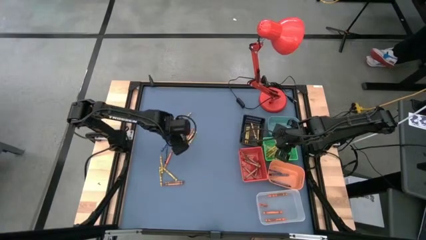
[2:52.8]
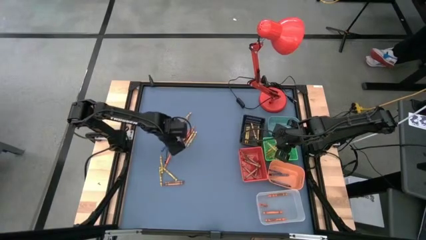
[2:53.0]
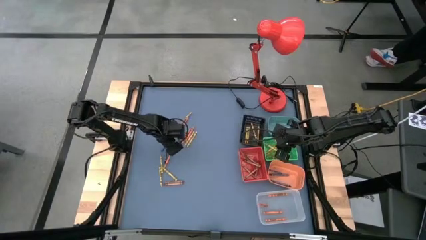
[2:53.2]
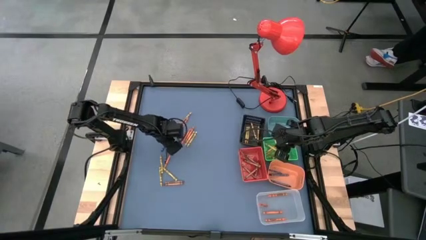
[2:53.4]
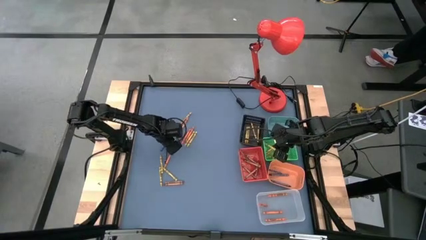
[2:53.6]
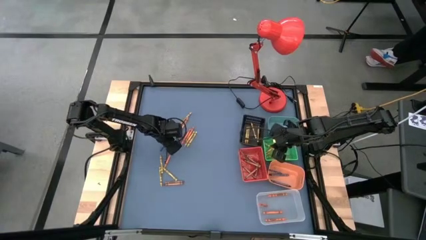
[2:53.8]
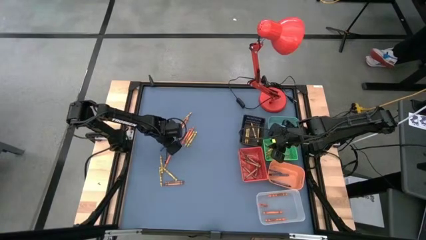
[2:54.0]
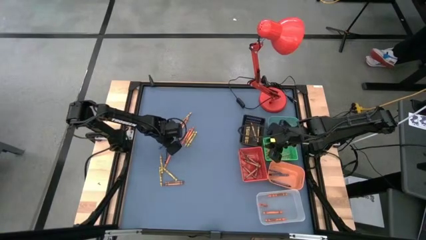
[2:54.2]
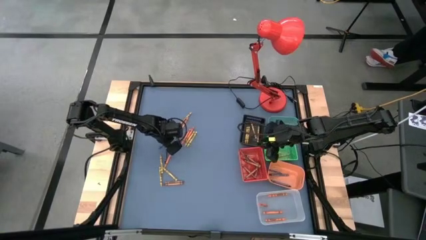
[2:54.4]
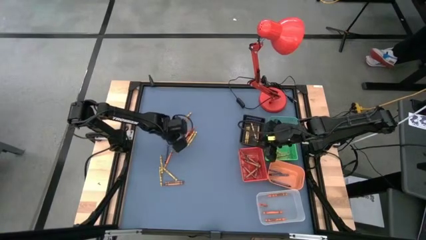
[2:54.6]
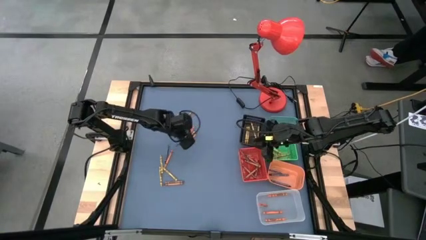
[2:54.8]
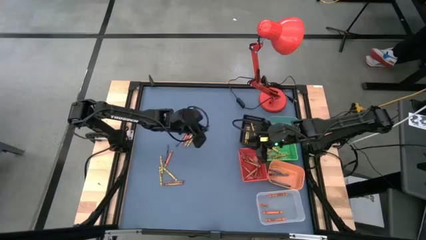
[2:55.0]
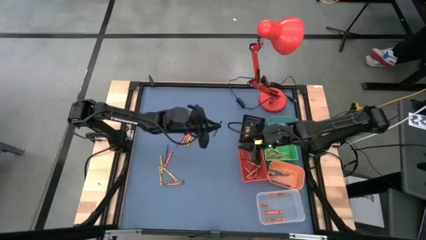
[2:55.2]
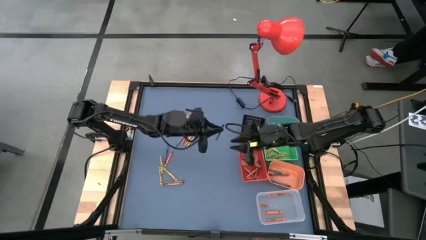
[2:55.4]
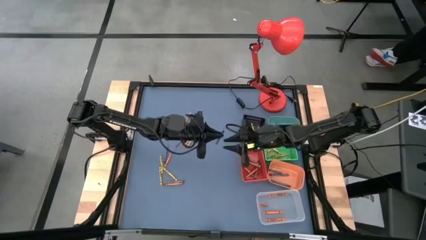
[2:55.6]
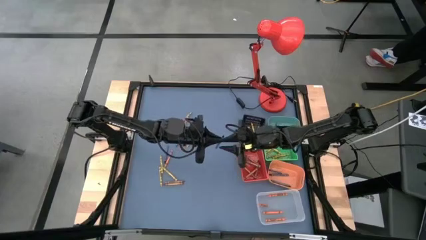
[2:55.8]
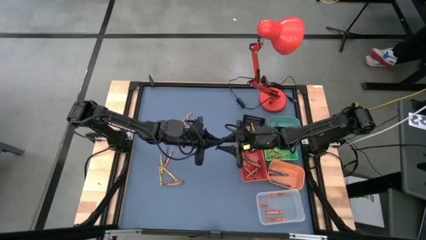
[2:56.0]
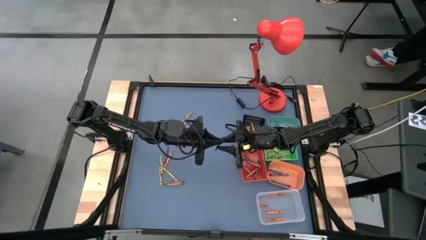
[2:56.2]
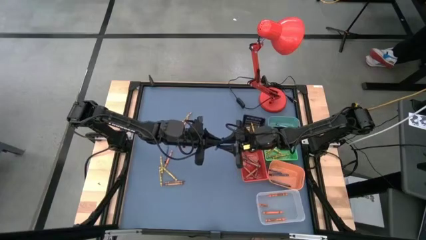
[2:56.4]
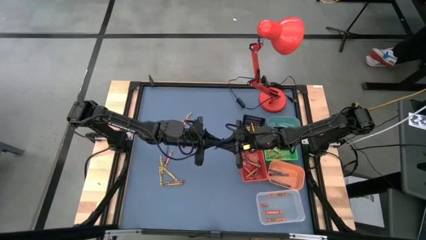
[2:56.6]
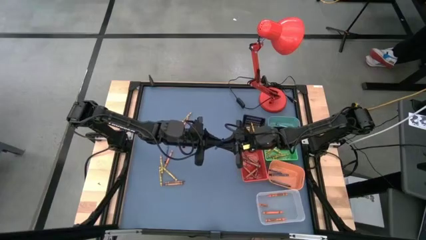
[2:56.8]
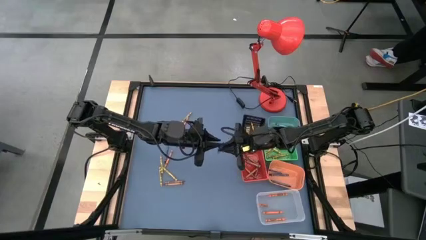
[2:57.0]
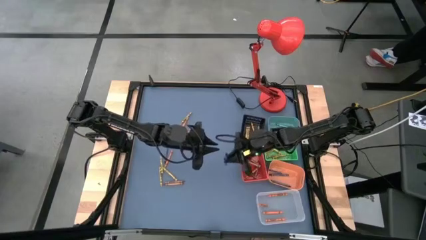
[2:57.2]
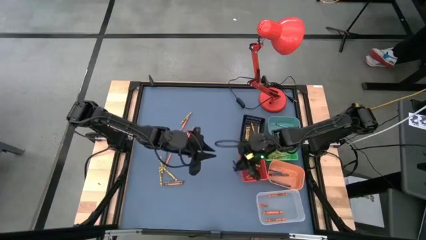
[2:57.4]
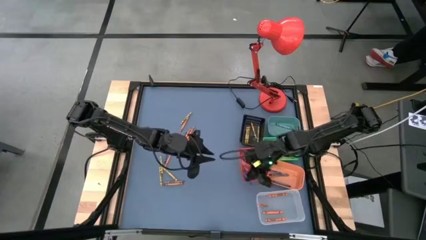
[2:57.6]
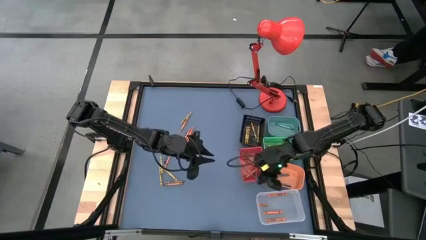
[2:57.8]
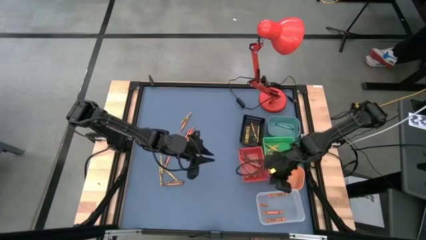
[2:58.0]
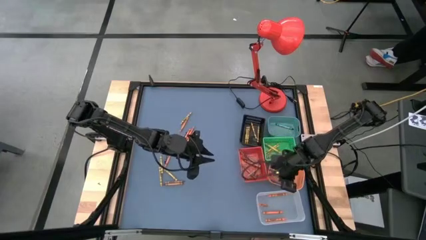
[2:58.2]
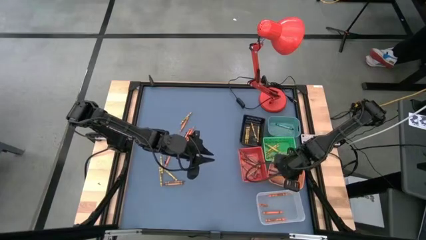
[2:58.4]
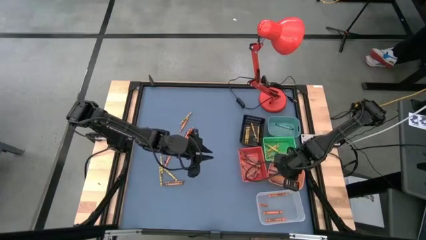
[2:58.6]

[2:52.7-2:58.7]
Task: Sort crayons
Put the blue crayon into the orange bin

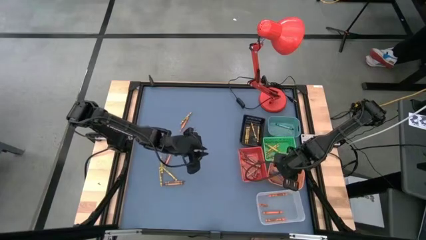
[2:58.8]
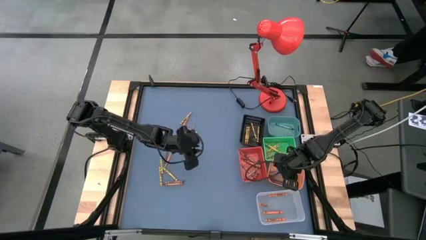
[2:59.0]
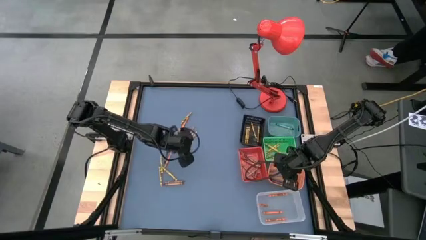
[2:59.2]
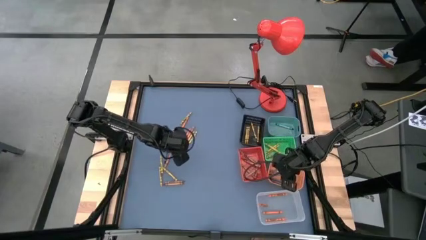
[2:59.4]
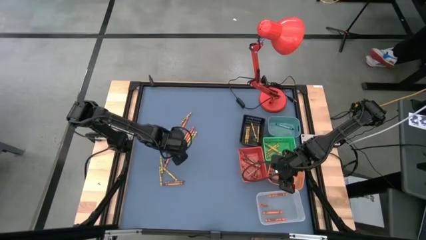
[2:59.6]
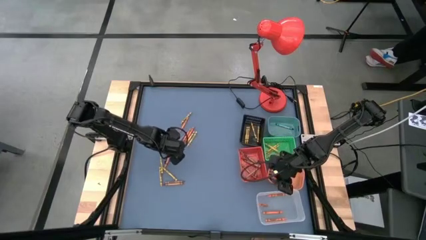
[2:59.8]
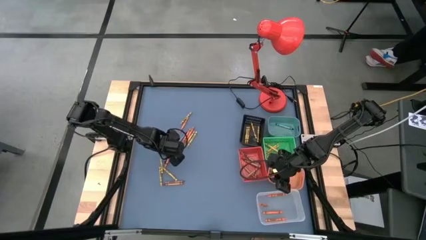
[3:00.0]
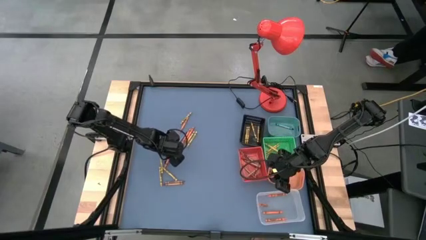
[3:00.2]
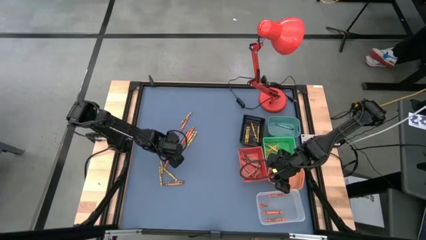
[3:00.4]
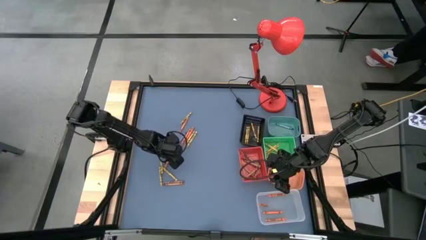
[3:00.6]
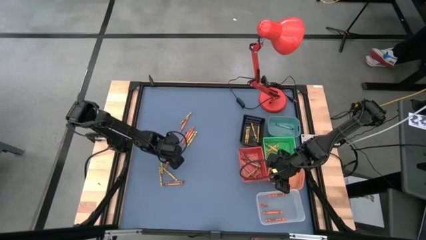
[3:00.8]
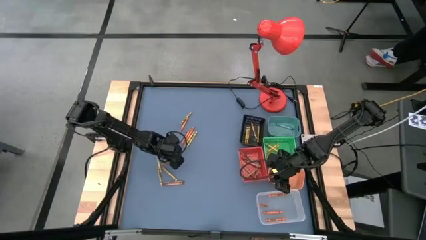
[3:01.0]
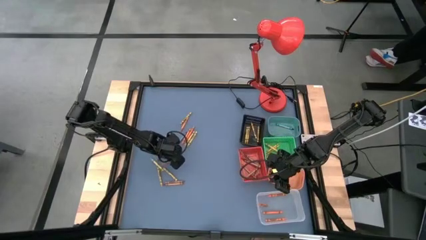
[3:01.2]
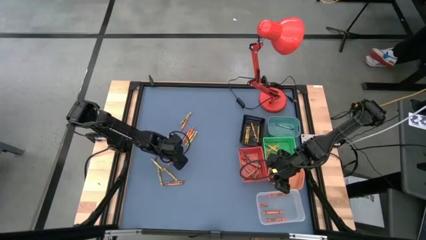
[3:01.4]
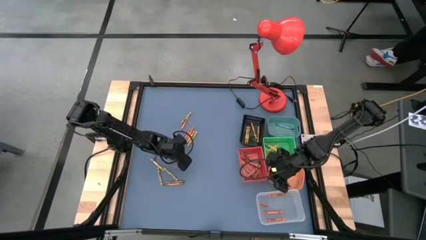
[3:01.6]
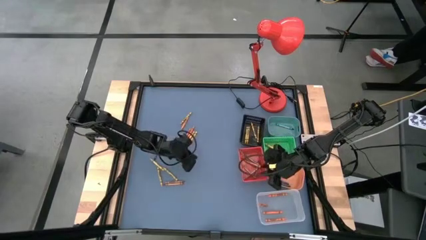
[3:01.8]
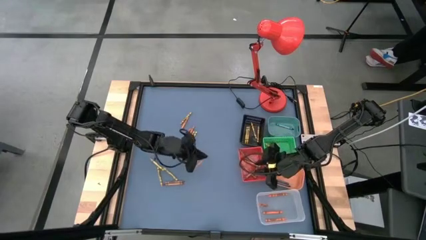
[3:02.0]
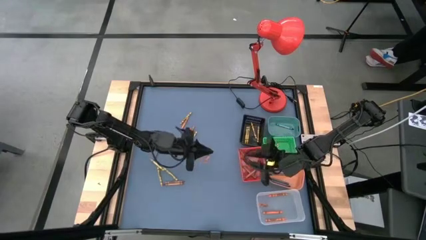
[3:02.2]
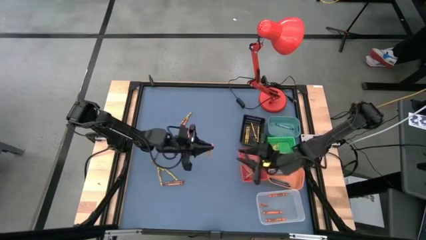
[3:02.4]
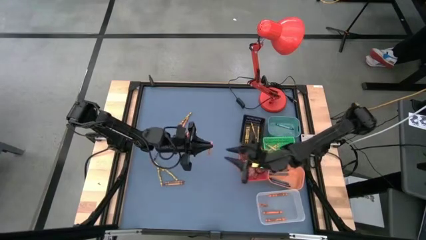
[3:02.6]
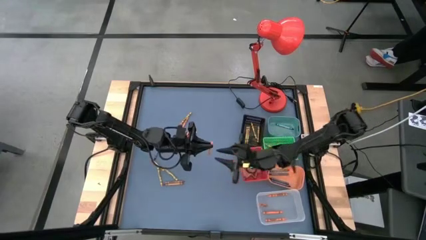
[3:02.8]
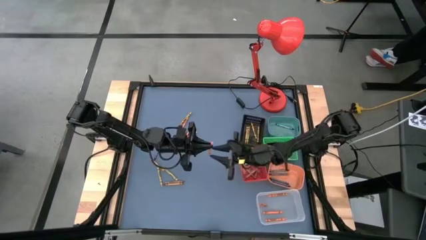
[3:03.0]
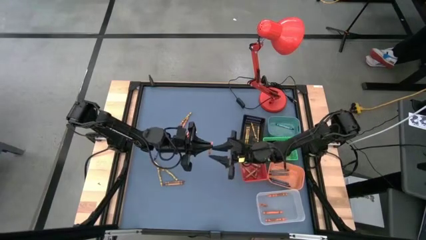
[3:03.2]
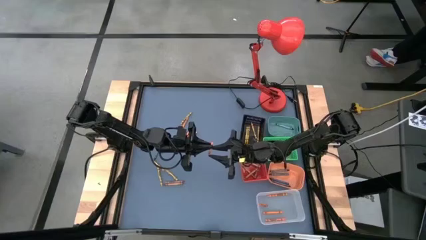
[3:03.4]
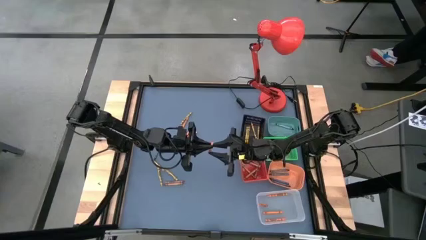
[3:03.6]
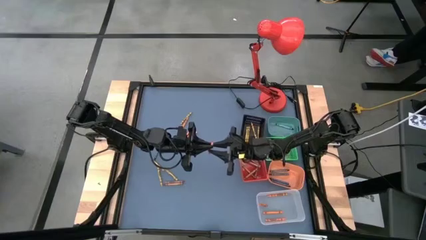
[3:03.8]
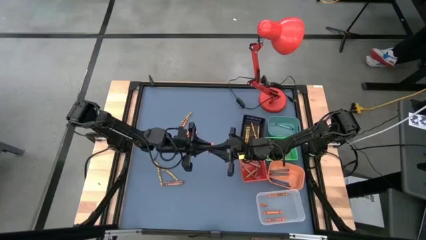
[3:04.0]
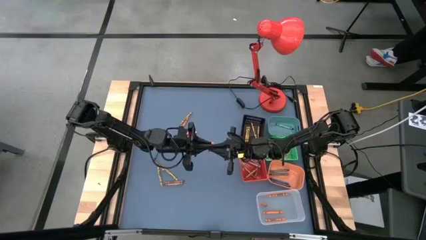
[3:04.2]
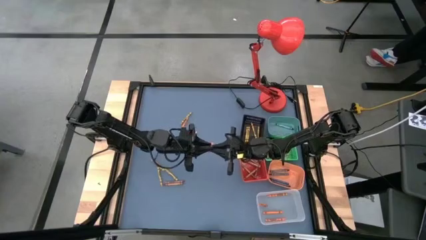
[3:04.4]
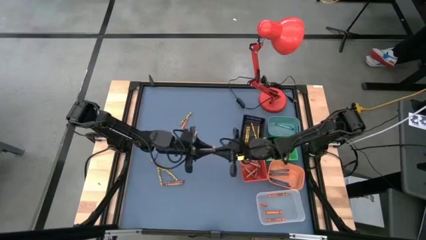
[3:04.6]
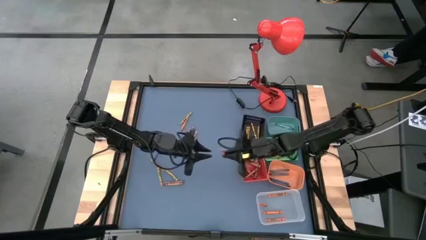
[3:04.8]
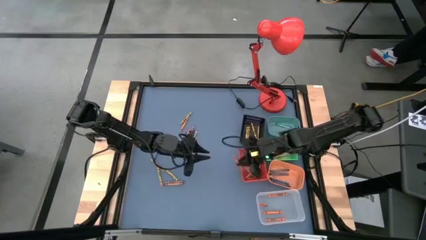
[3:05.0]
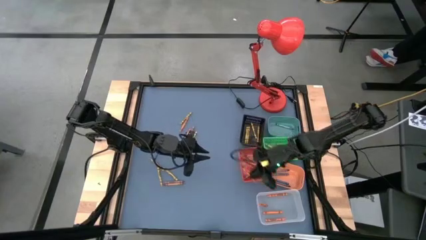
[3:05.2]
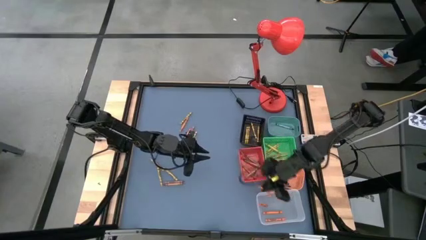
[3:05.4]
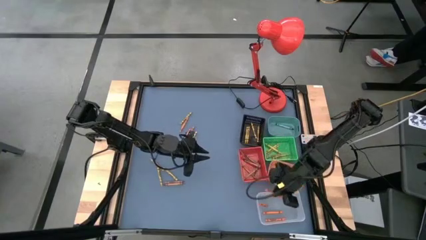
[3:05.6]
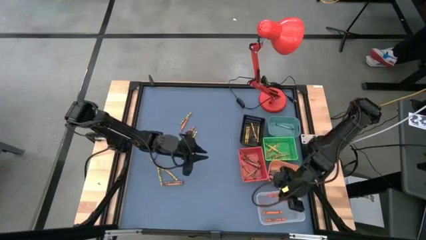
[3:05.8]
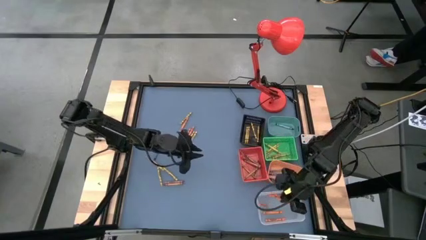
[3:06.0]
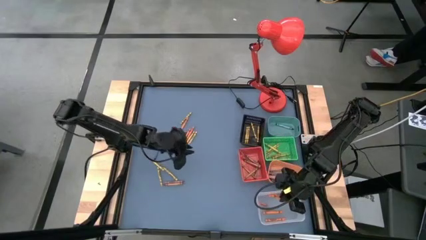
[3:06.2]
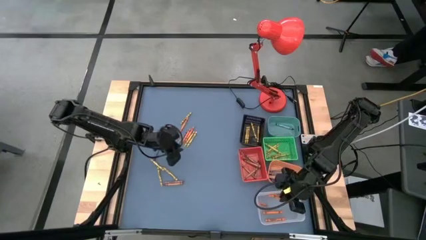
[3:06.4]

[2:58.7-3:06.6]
Put the orange crayon into the transparent bin

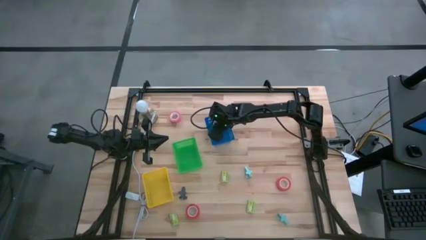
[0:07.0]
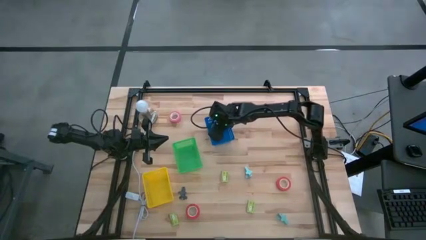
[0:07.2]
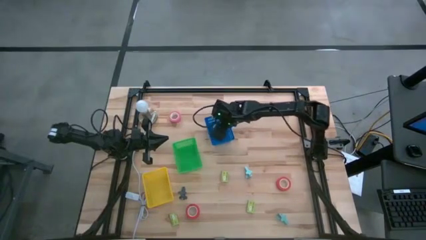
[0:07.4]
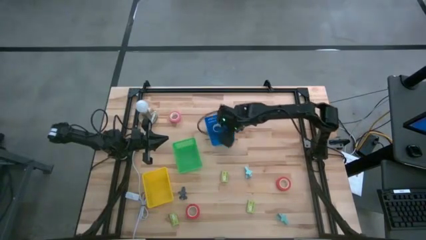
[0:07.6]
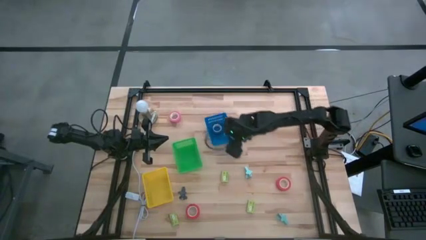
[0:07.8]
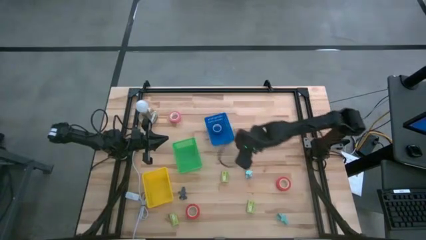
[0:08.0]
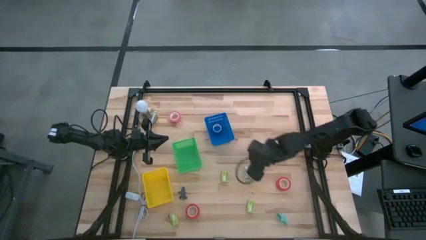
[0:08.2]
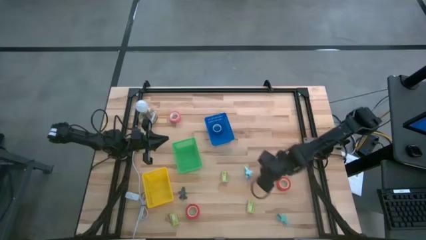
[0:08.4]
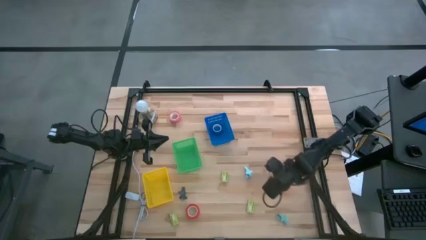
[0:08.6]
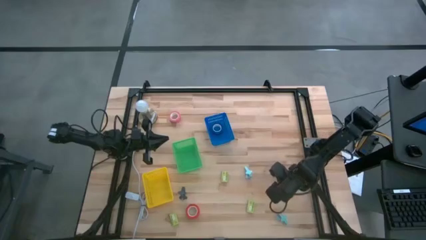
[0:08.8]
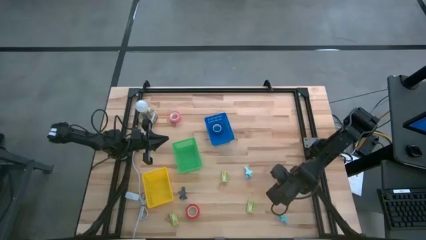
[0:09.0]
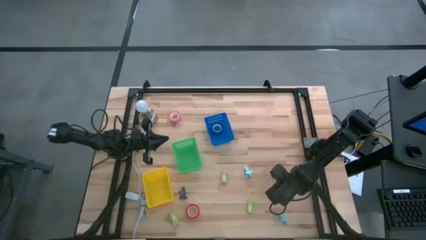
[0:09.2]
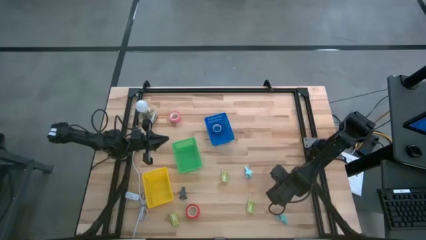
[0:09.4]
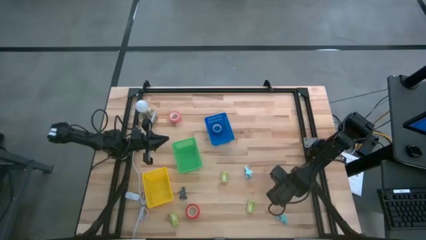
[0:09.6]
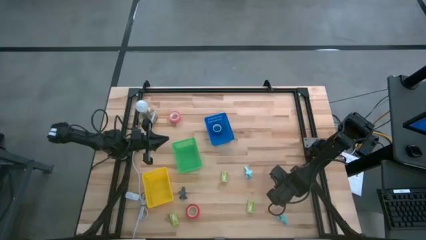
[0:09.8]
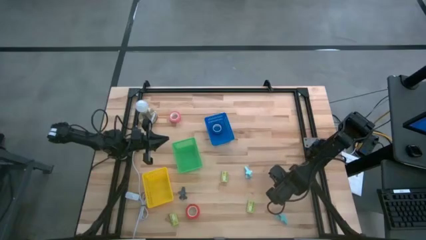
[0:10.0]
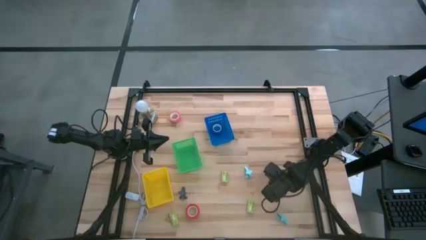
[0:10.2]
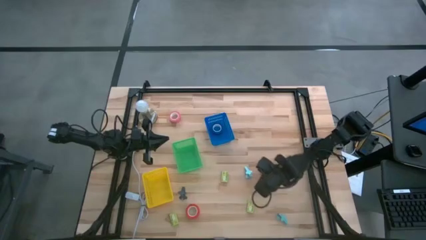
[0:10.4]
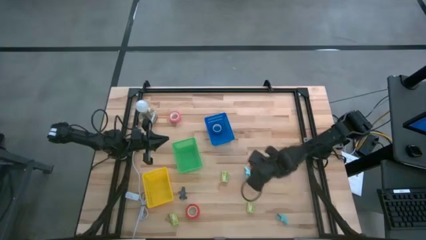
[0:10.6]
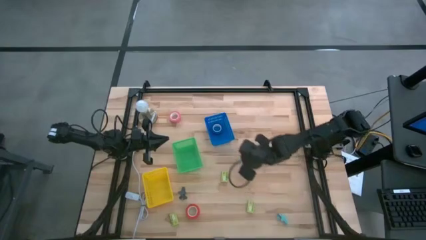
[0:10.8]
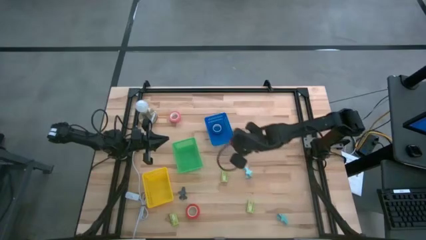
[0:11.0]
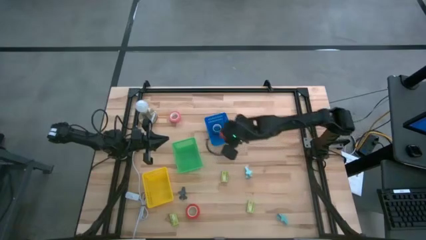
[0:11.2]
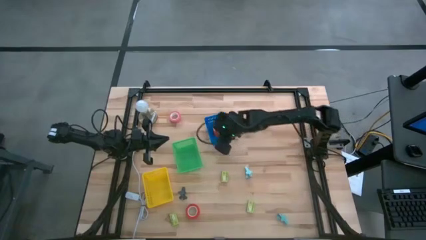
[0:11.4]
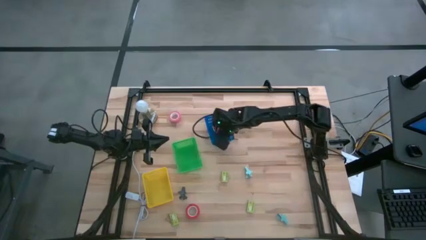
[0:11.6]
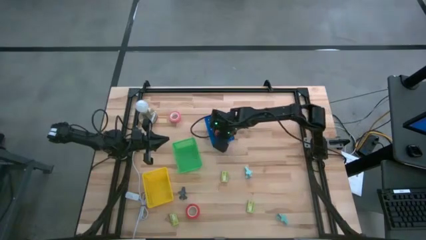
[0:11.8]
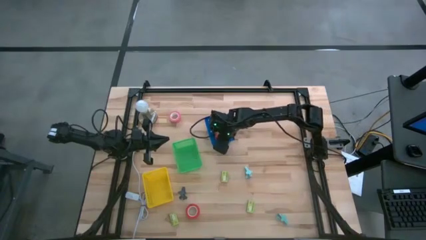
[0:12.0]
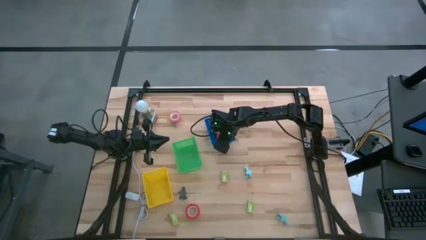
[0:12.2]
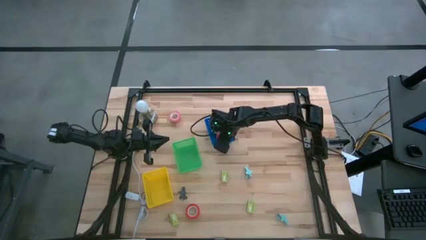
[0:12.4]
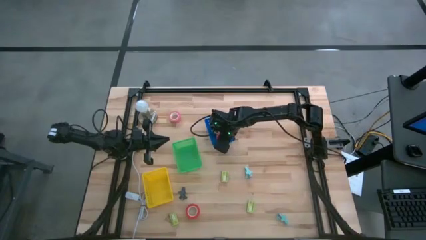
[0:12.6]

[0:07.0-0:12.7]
Task: Pick and place Stapler, Stapler remover, tape
Put the top orange tape into the blue basket
